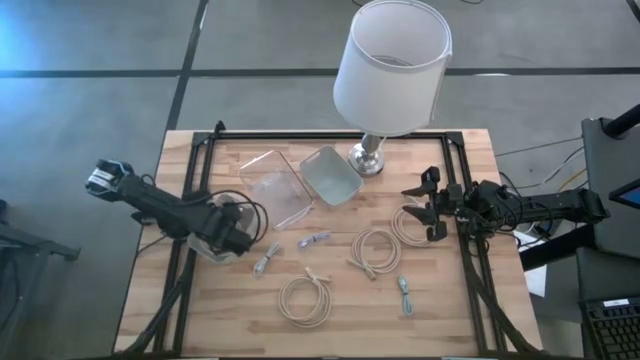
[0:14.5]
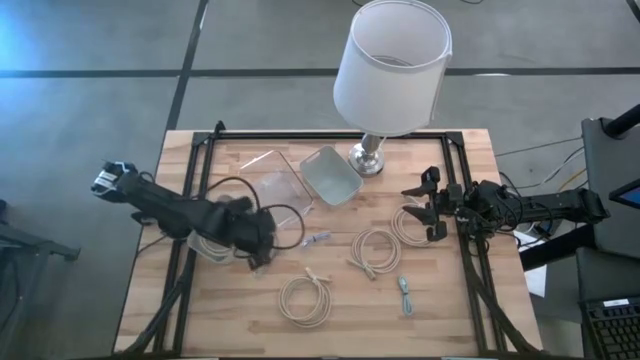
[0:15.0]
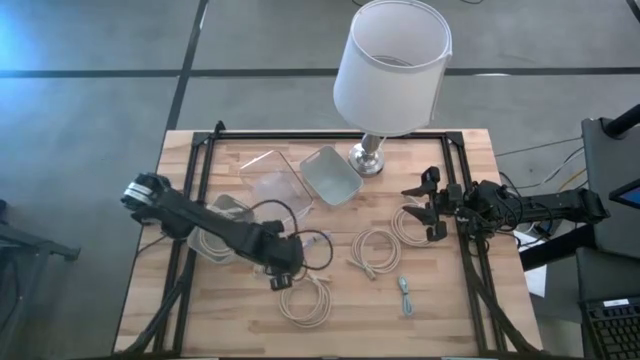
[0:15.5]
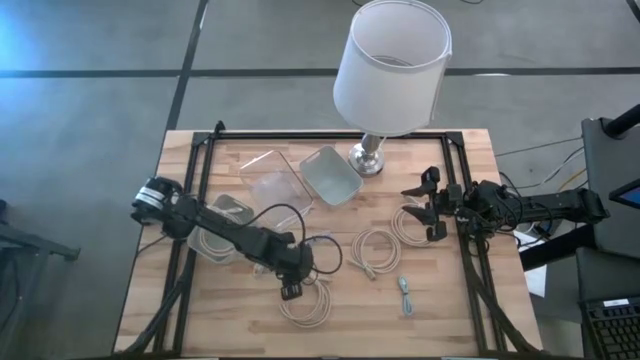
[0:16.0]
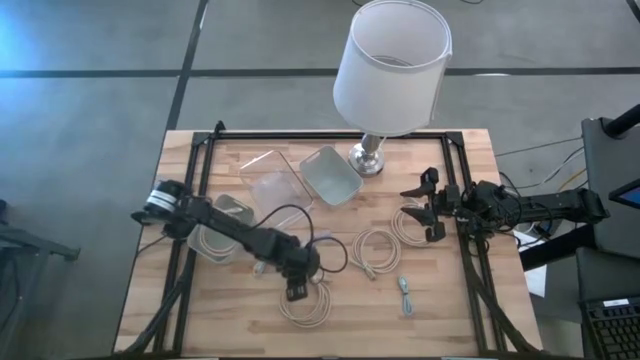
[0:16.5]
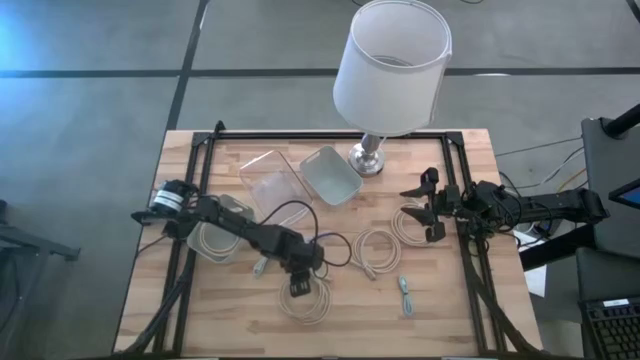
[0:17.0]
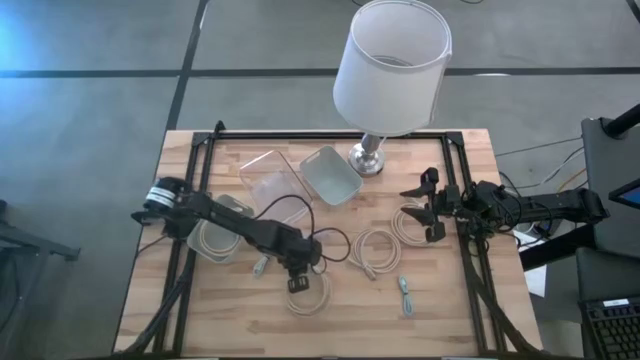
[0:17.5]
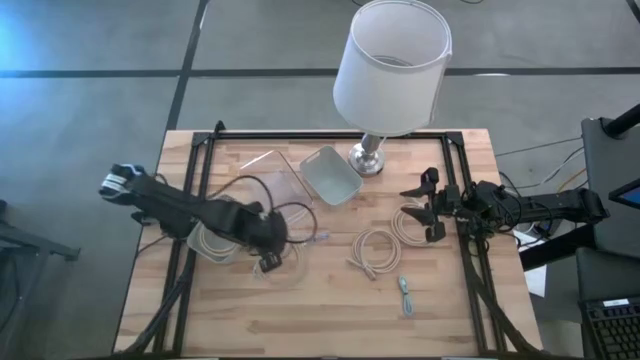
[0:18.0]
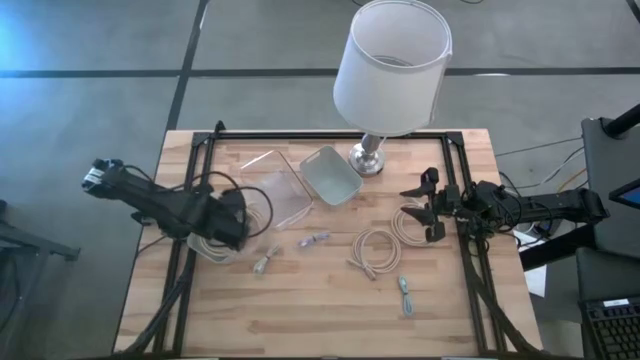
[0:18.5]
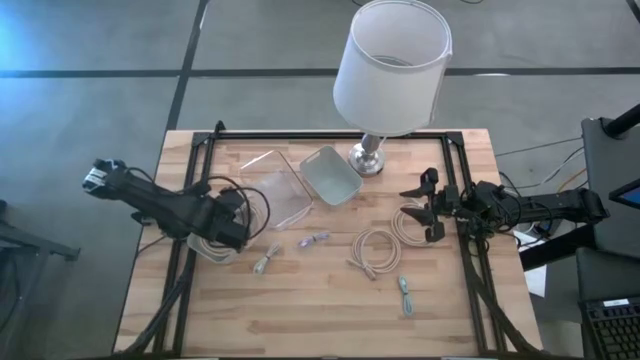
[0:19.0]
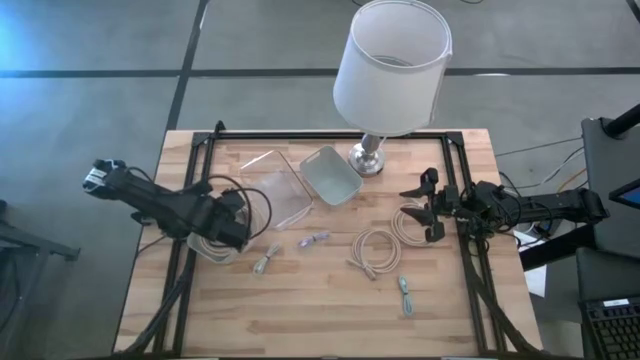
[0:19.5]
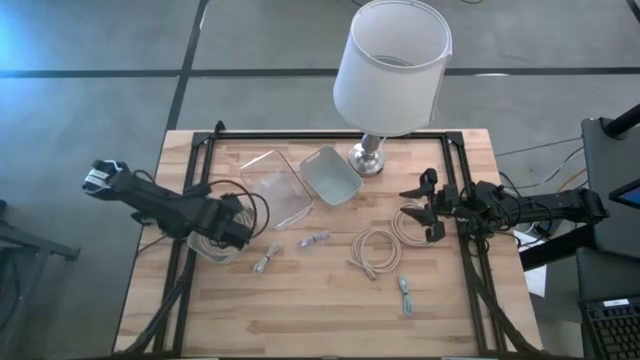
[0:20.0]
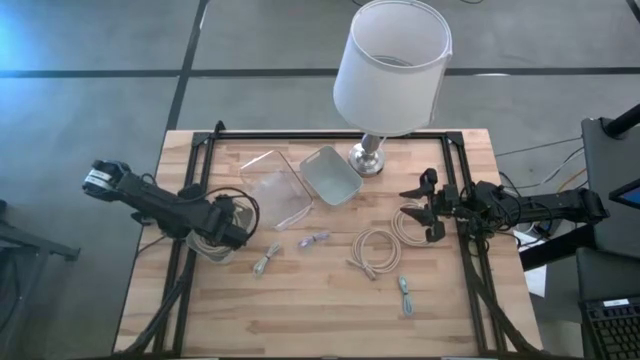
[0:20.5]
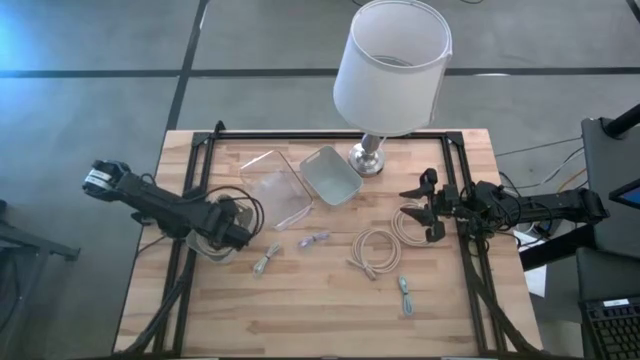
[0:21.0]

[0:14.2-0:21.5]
Task: Pick & Place USB Port
Put the brown hdmi cable into the left gray bin

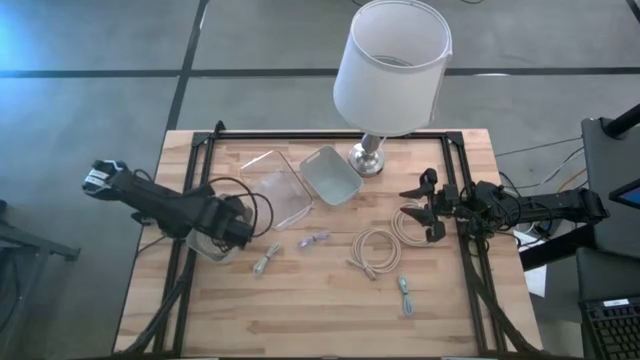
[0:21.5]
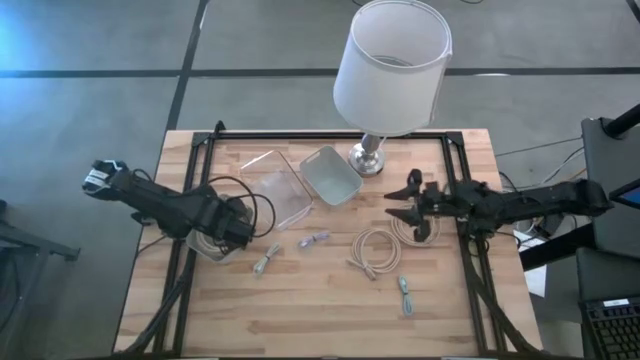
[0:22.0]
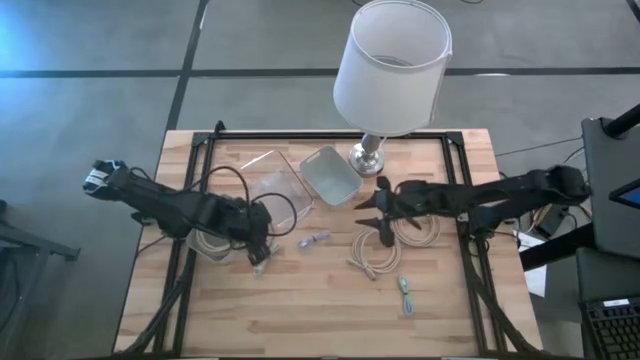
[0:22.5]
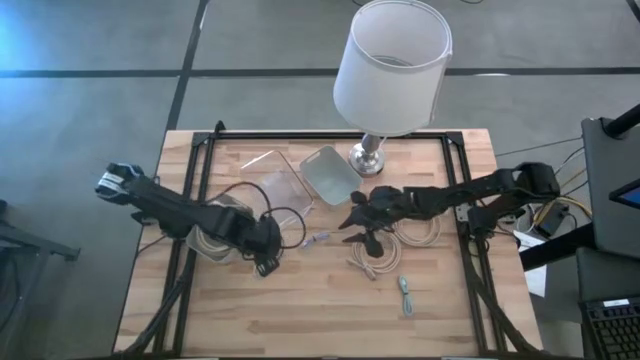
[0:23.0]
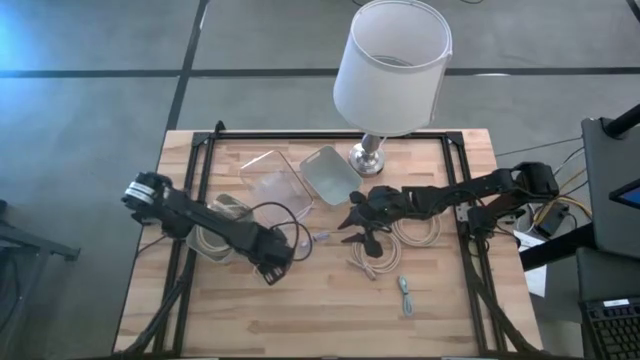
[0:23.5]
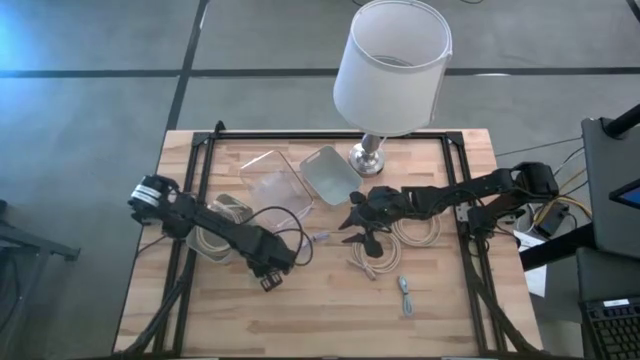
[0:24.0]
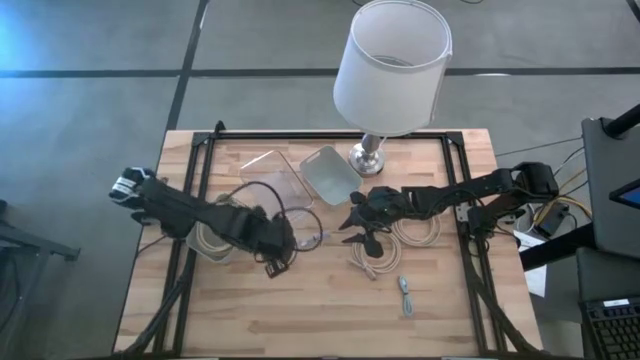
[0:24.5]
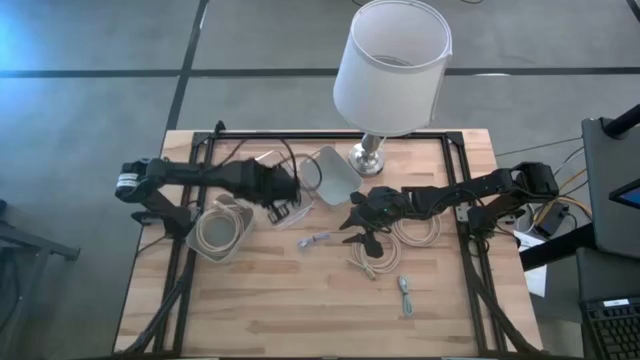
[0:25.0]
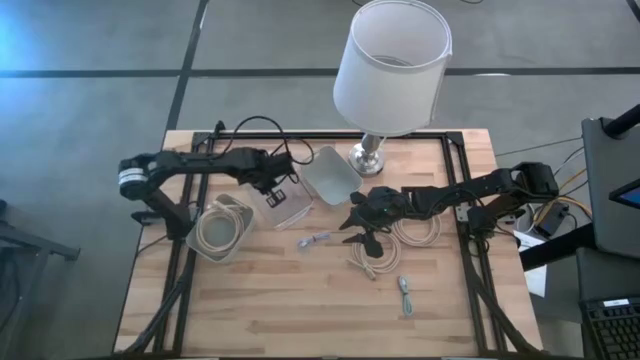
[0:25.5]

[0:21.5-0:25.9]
Put the white charger cable into the transparent bin

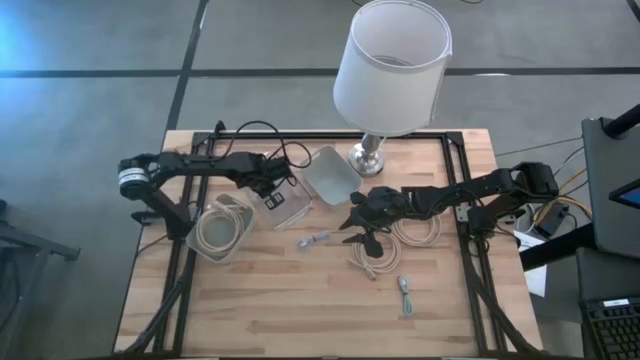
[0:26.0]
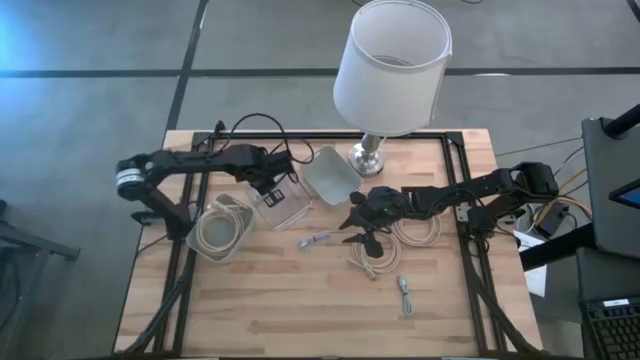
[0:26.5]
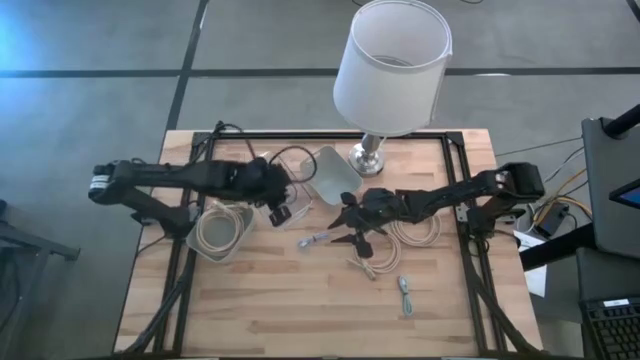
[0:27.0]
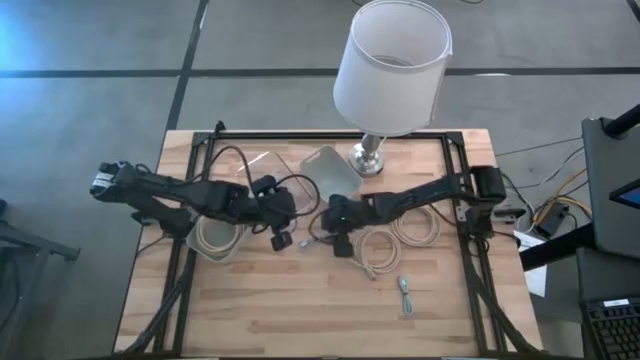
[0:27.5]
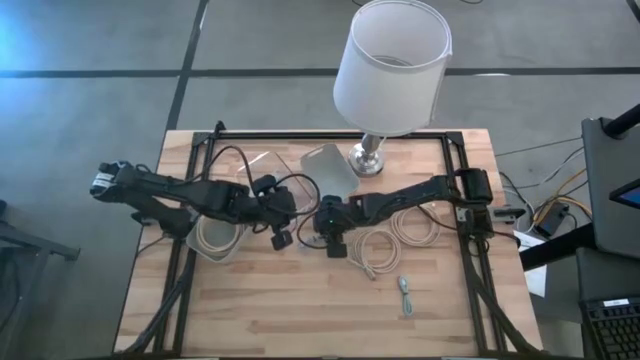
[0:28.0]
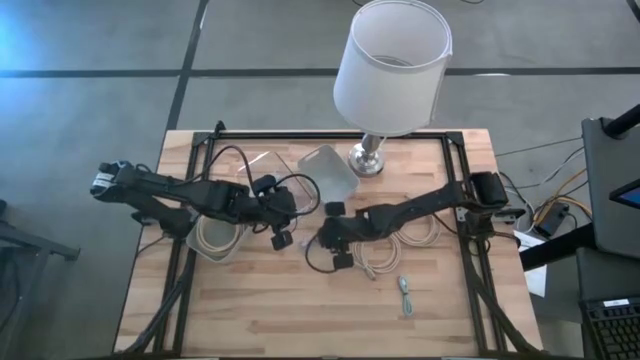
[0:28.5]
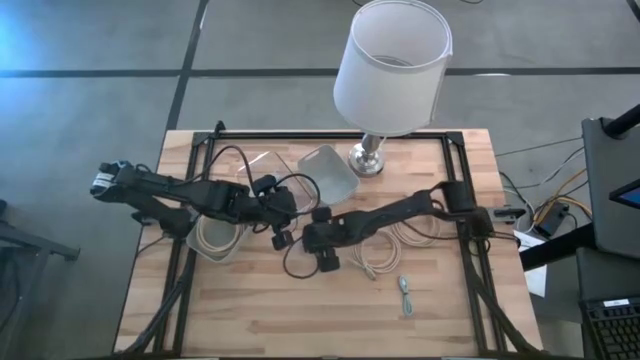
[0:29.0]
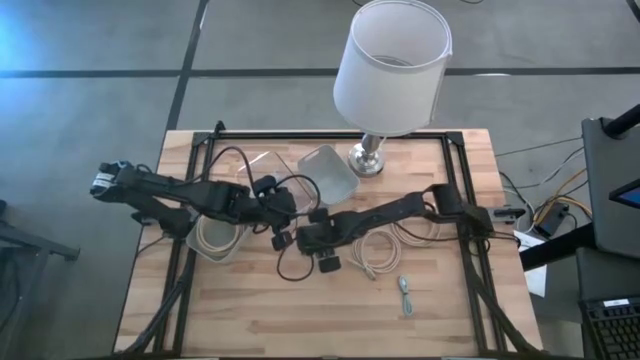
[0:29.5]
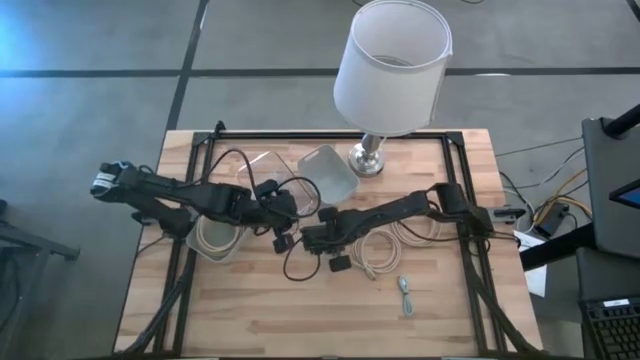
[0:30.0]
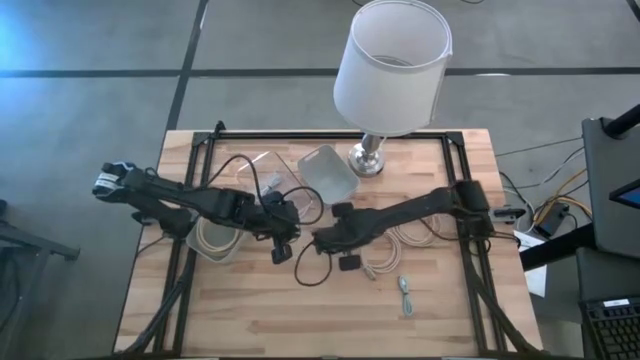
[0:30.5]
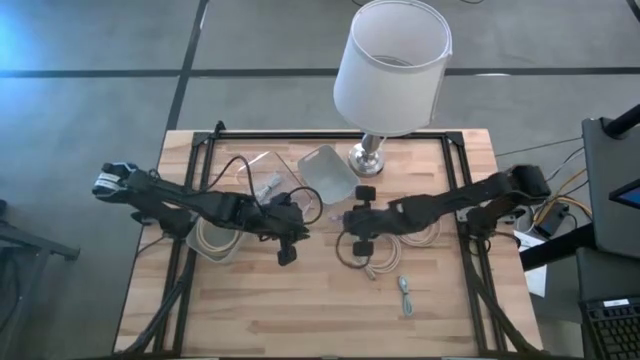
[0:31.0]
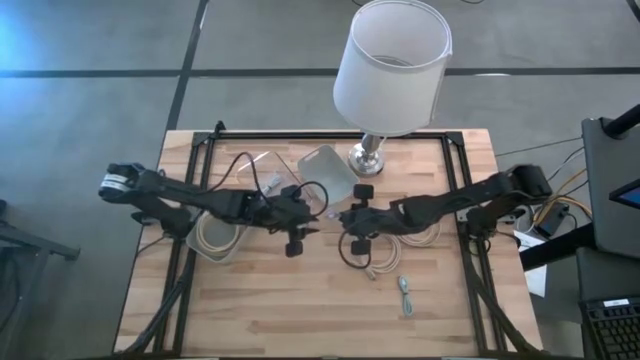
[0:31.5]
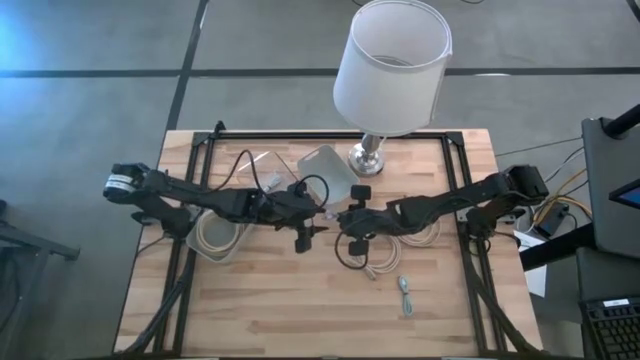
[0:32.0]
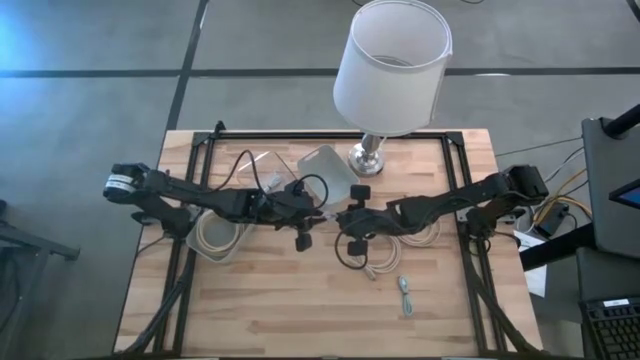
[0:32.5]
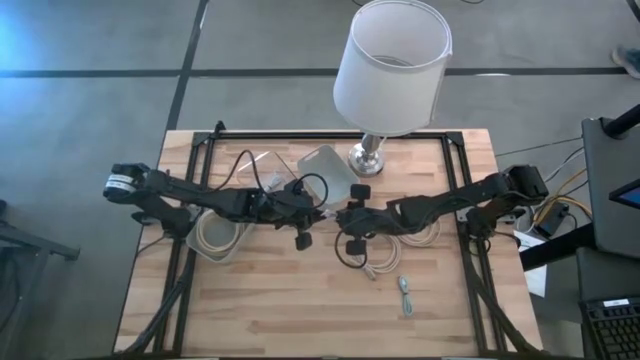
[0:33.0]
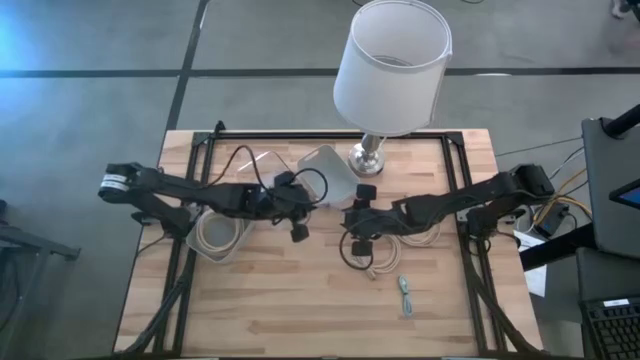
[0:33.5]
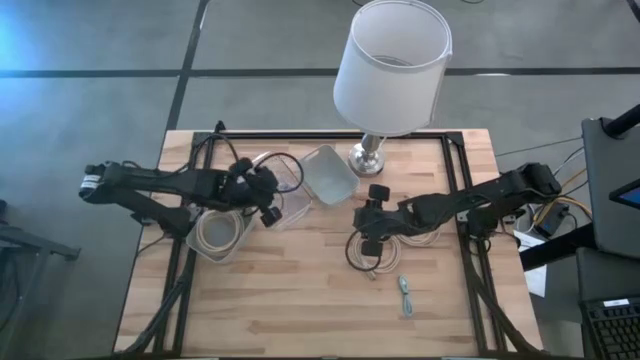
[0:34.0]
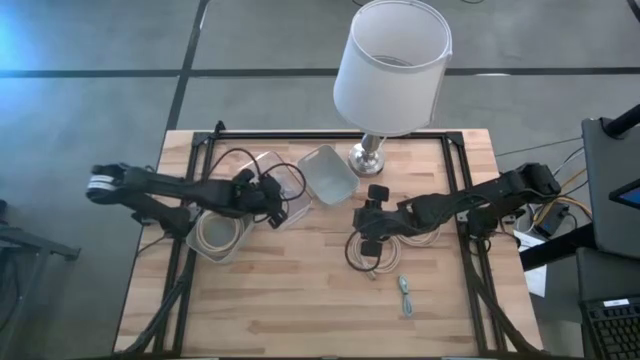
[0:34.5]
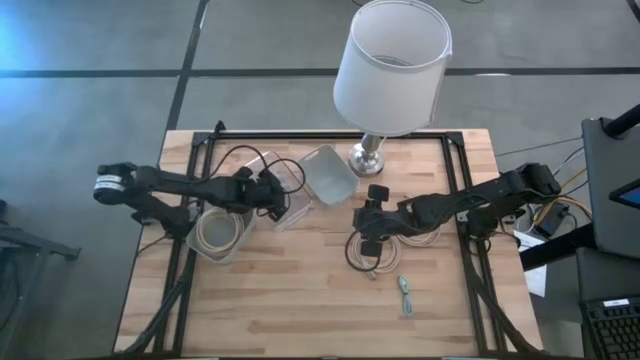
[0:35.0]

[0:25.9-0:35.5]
Put the purple charger cable into the transparent bin
